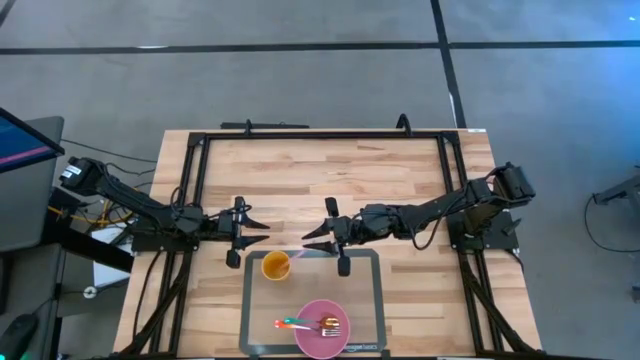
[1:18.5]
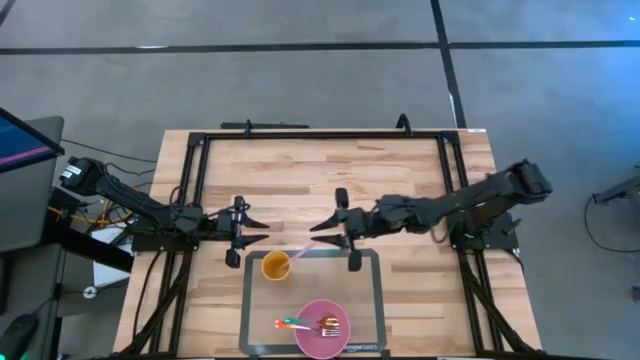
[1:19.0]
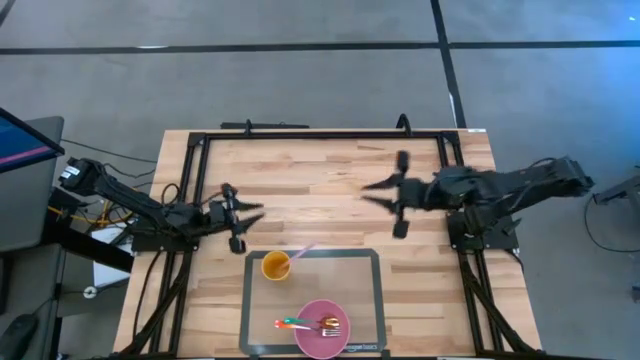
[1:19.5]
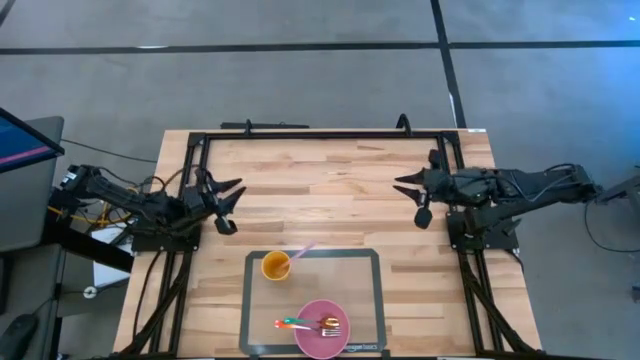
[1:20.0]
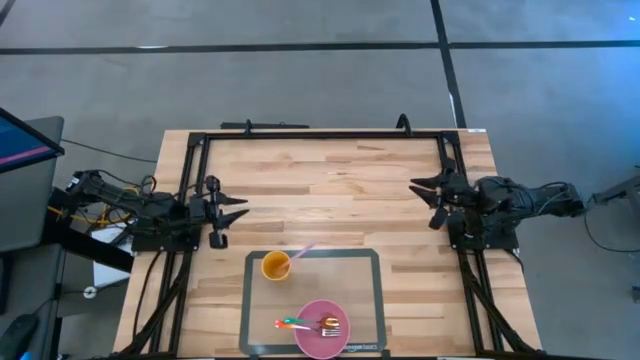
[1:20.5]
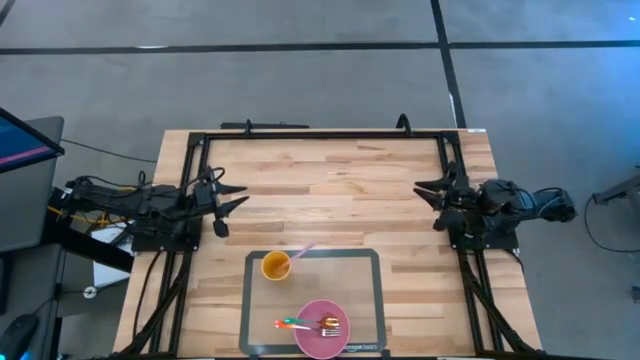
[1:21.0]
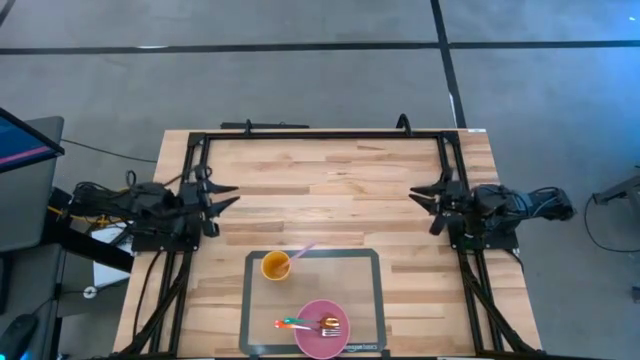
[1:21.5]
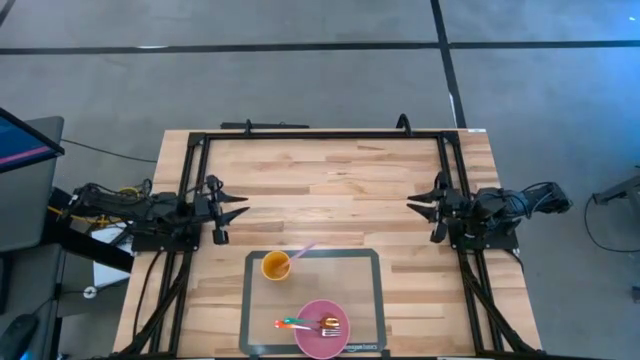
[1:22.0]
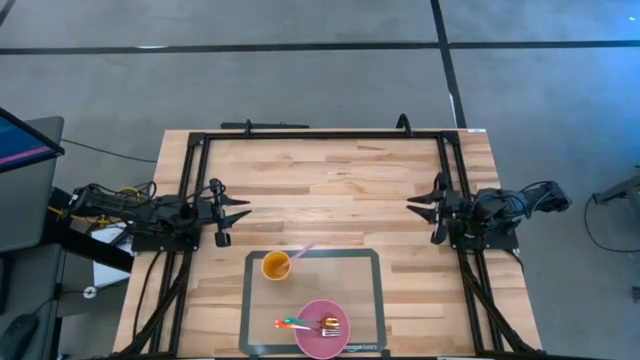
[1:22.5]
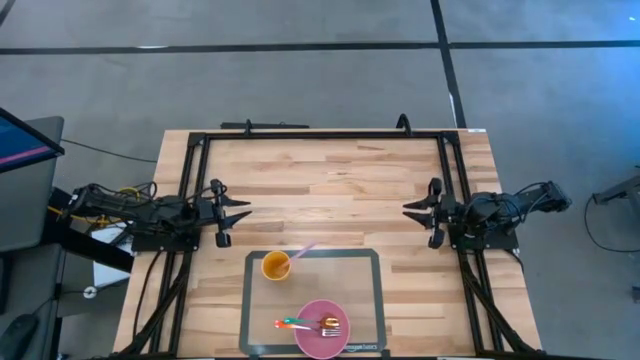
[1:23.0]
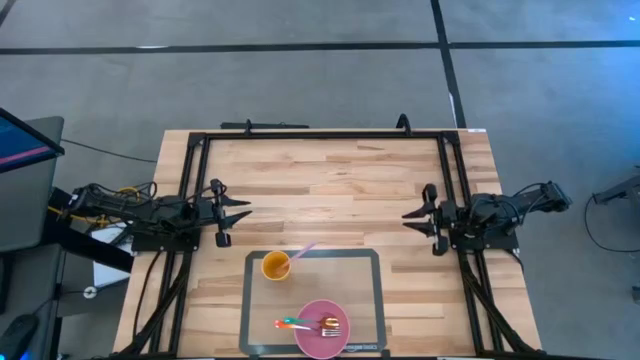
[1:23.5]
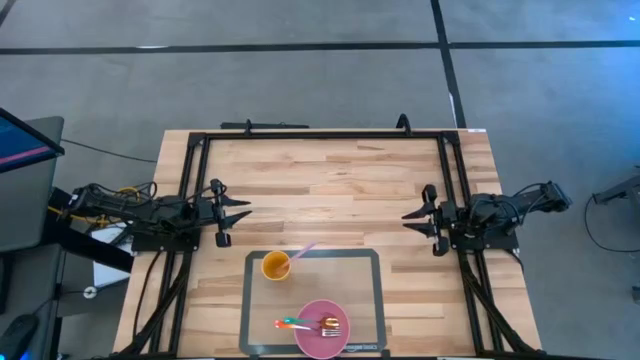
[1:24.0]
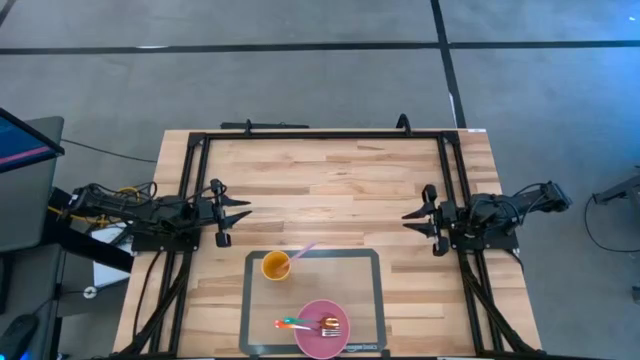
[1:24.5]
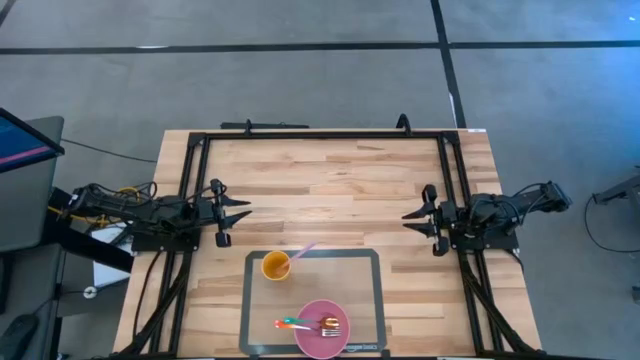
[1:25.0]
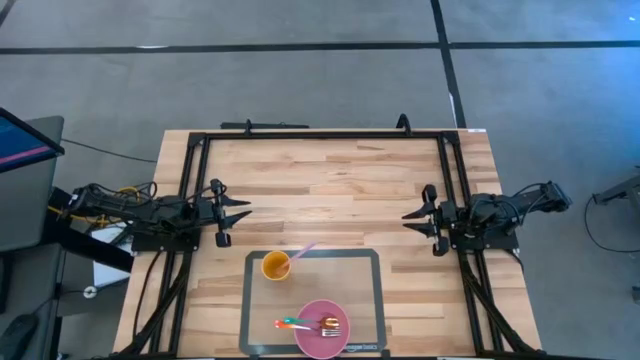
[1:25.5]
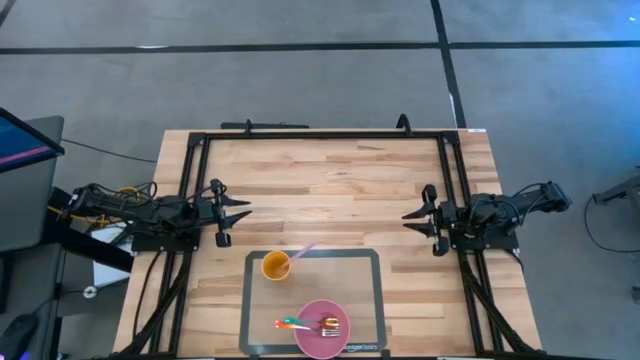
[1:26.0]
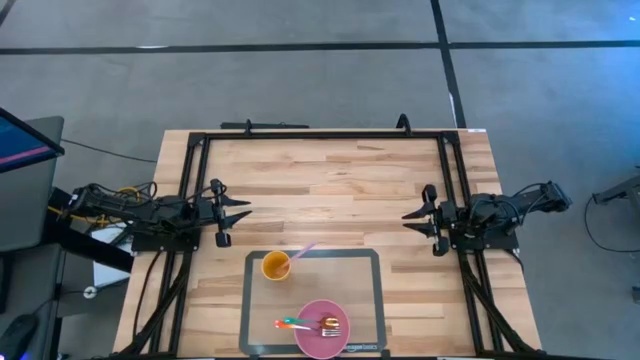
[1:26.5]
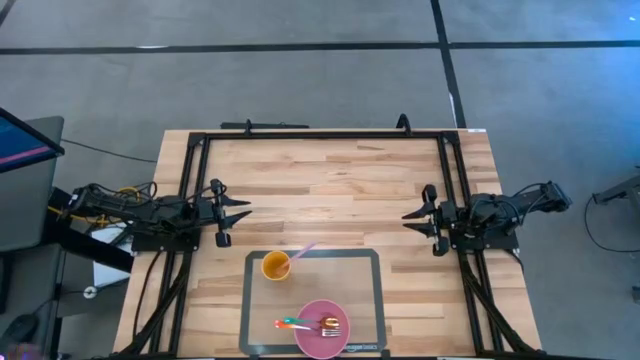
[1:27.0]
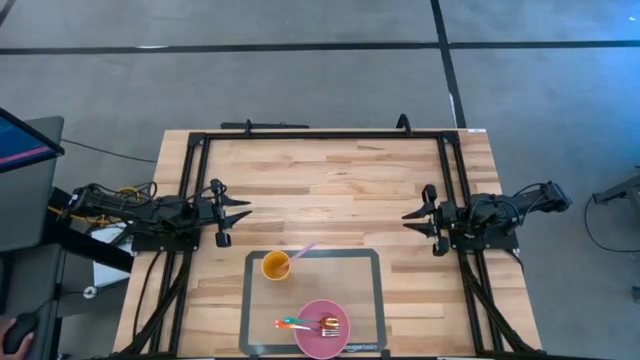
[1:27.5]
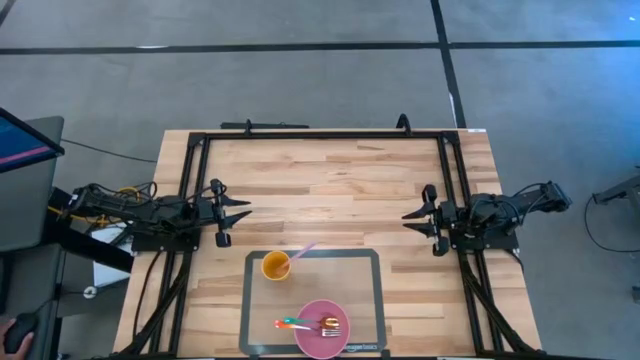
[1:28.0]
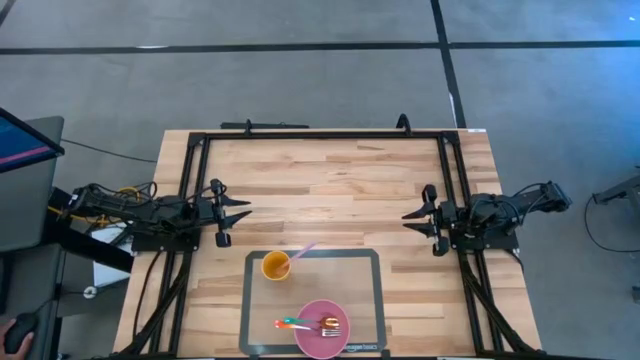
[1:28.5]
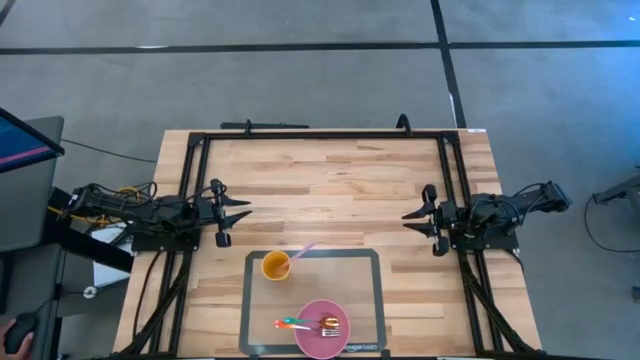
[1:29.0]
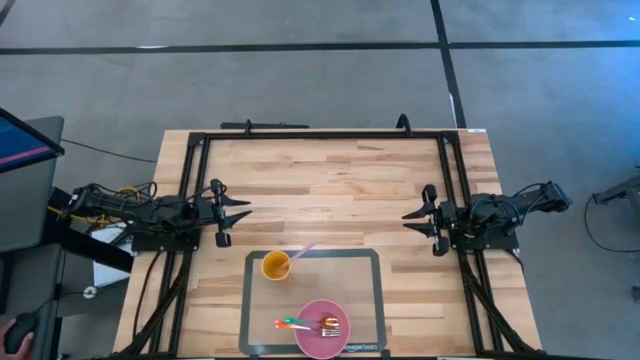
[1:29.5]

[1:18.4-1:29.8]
Task: Pick & Place Utensil
Return to Home Position

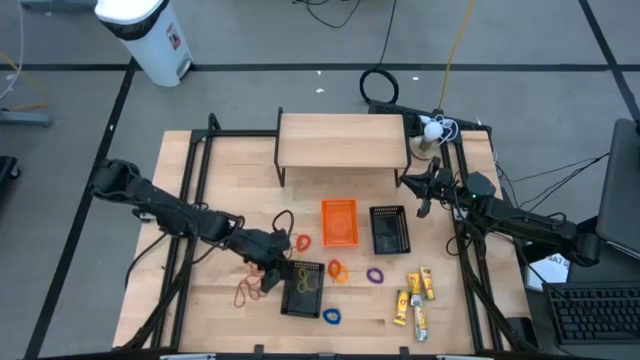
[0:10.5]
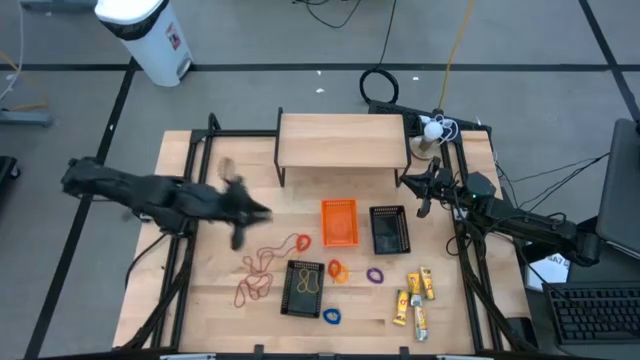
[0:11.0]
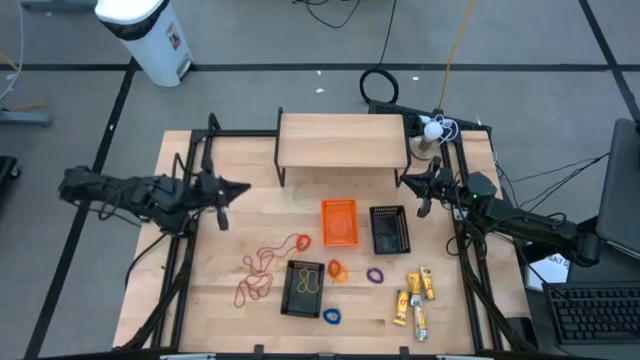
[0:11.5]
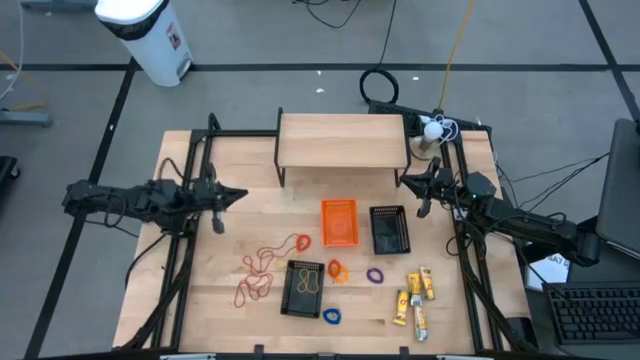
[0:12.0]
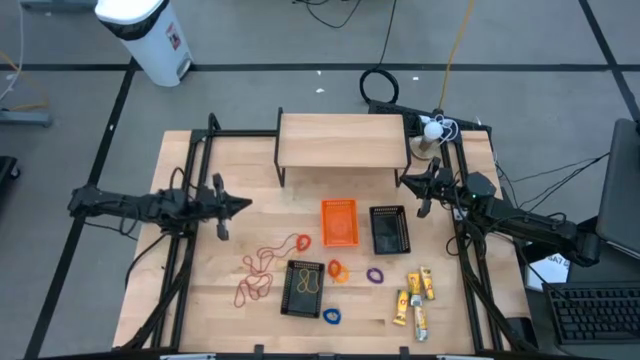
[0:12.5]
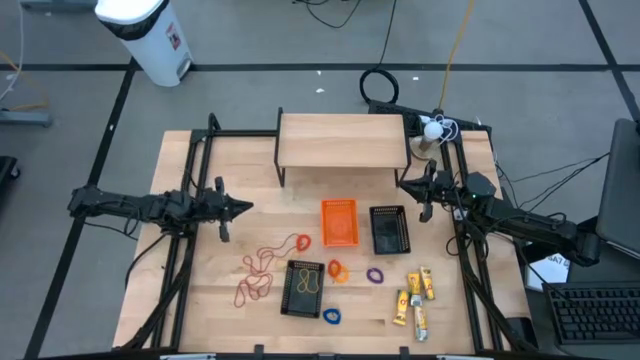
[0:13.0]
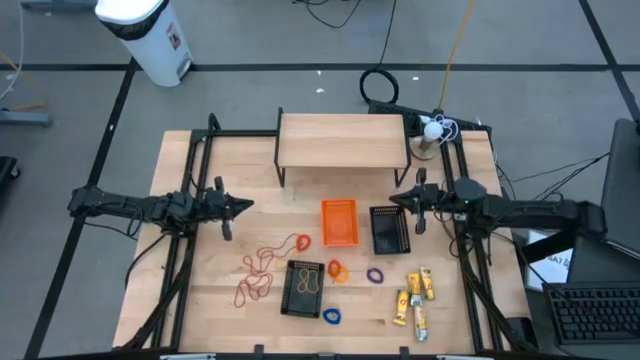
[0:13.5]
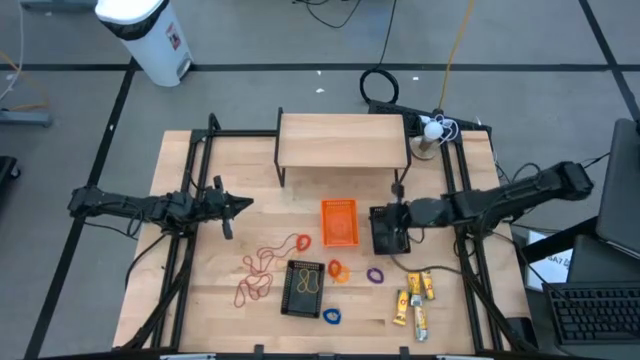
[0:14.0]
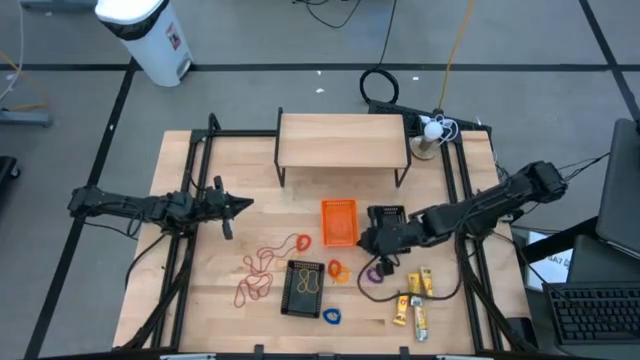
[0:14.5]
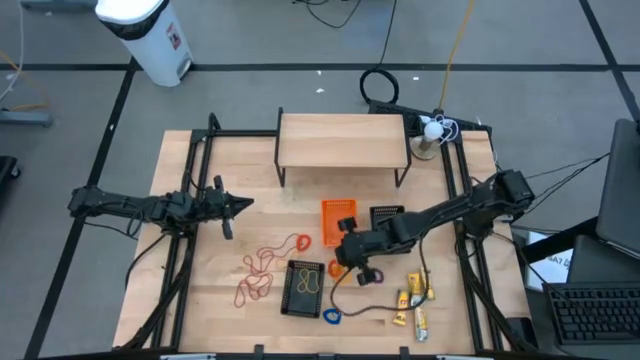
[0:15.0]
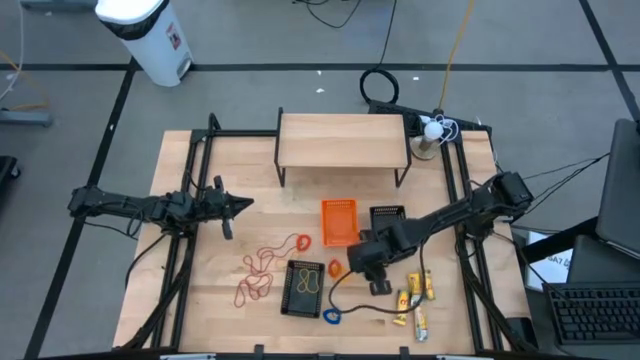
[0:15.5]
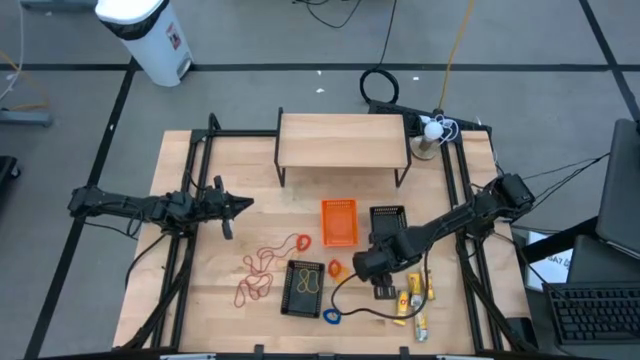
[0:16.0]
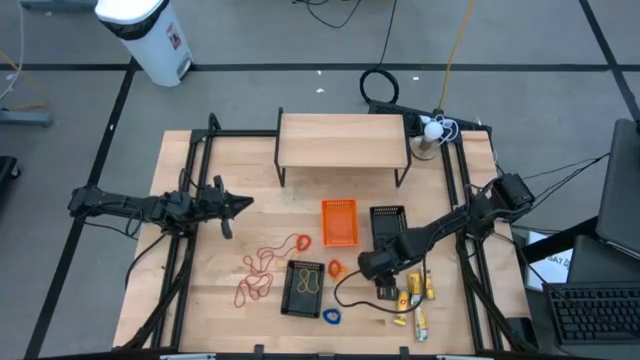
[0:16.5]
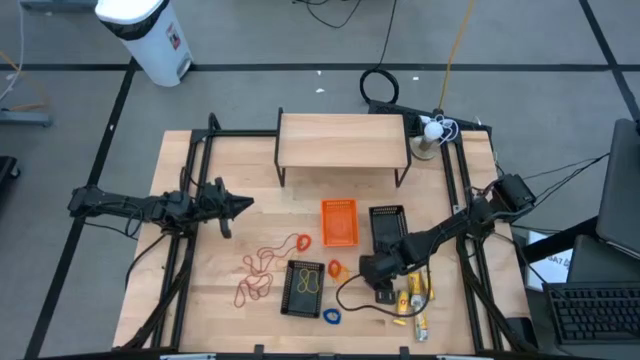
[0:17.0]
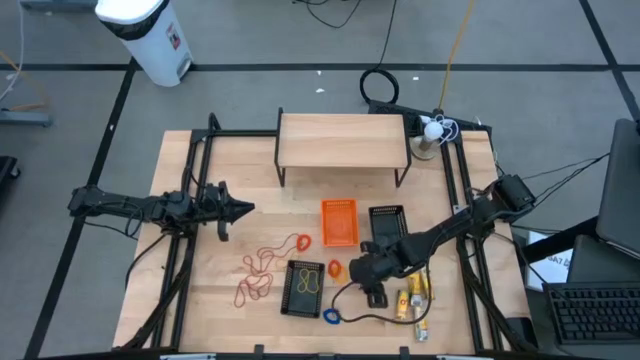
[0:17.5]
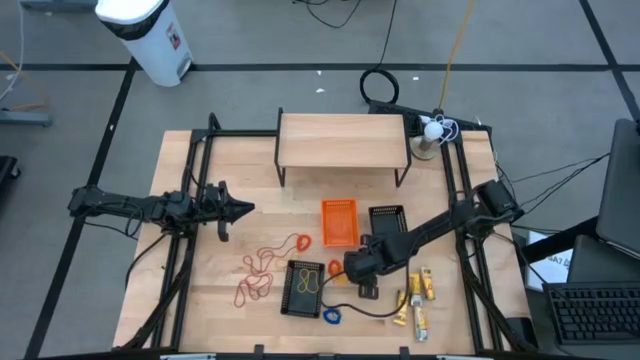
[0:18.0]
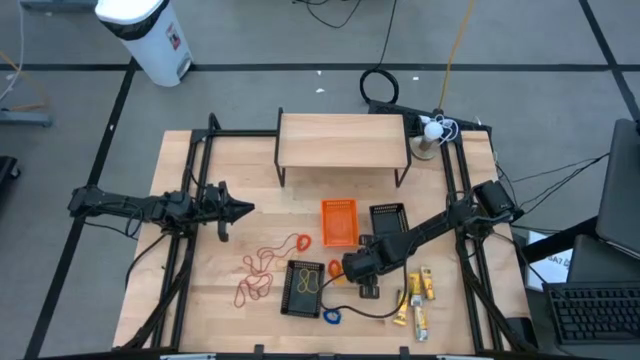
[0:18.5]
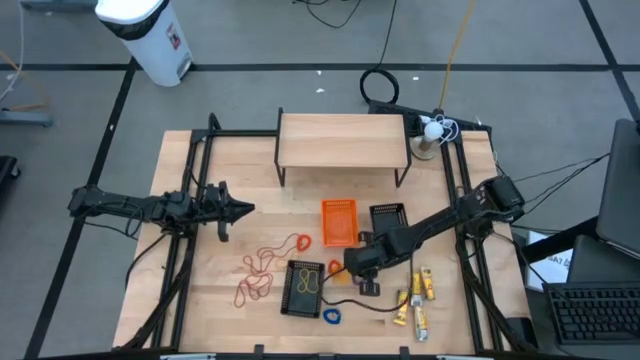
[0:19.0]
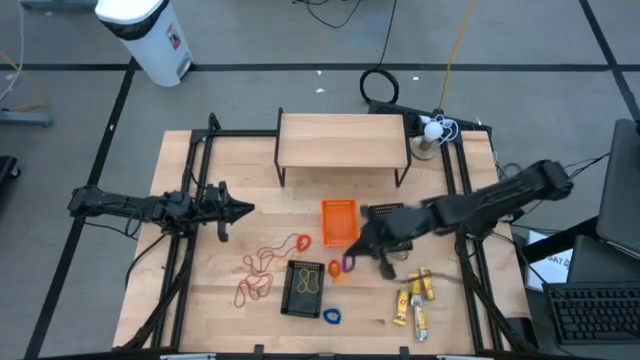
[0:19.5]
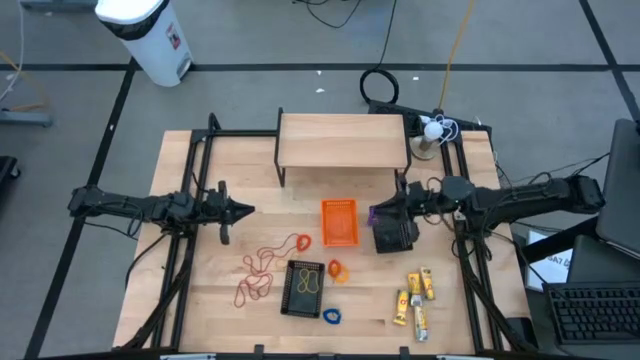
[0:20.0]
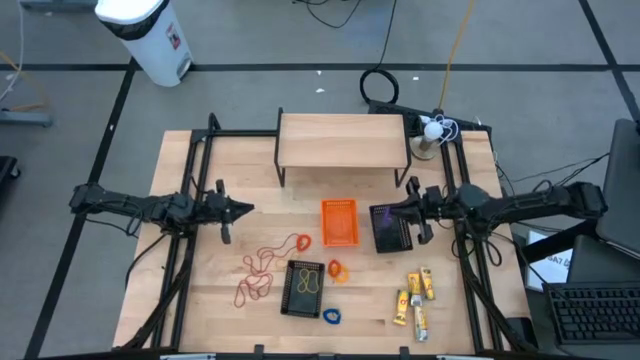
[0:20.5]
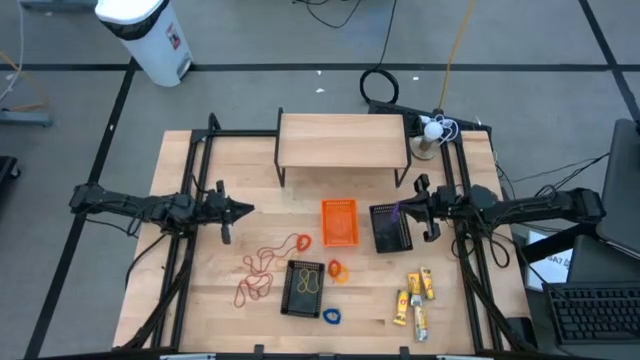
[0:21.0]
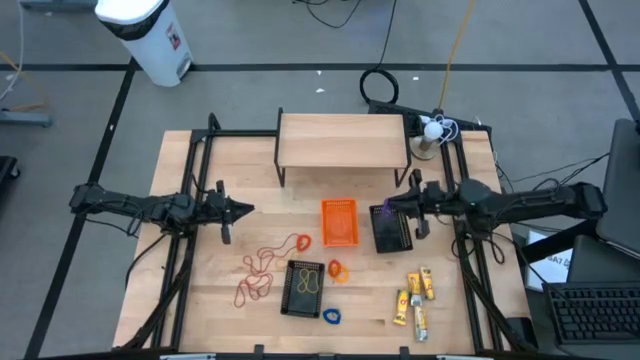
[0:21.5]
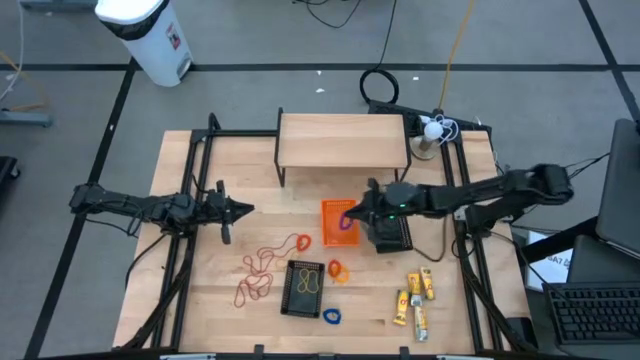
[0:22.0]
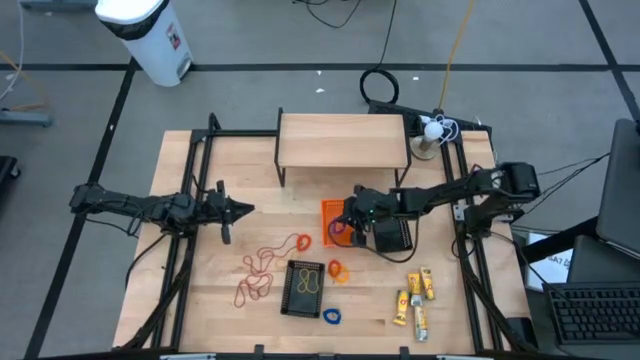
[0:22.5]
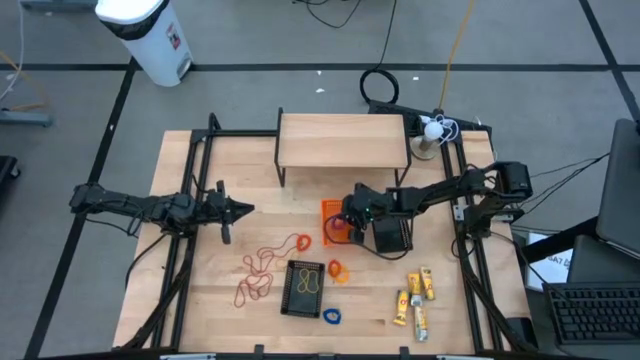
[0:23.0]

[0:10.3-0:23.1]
Task: Pick & Place Office Desk Supplies
Put the violet spring keychain into the orange bin
